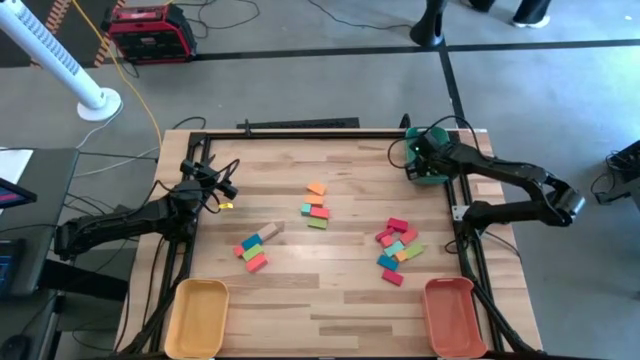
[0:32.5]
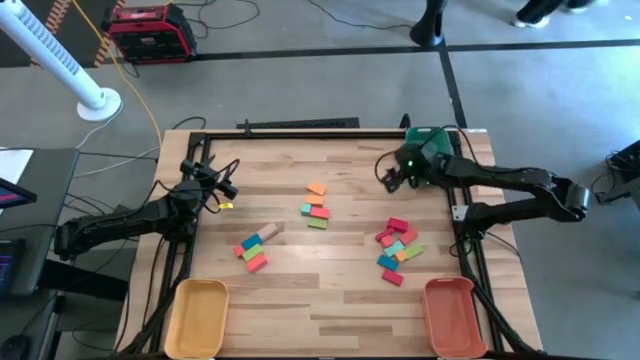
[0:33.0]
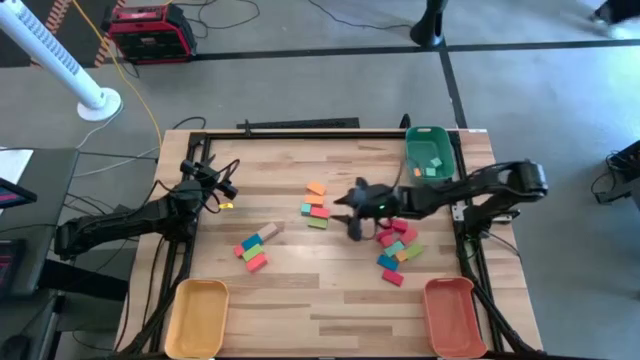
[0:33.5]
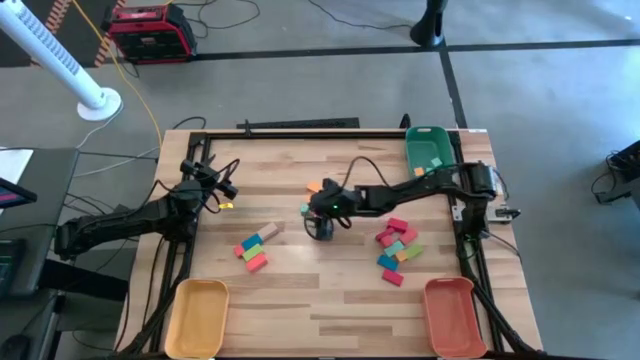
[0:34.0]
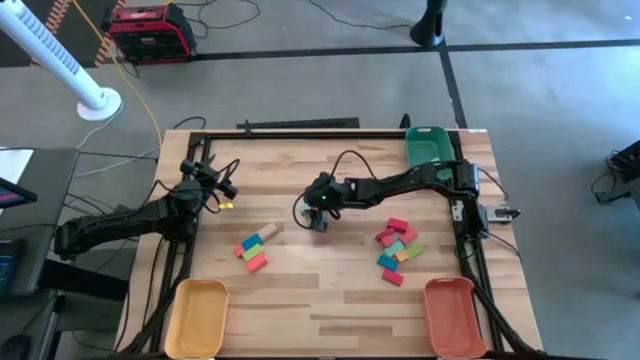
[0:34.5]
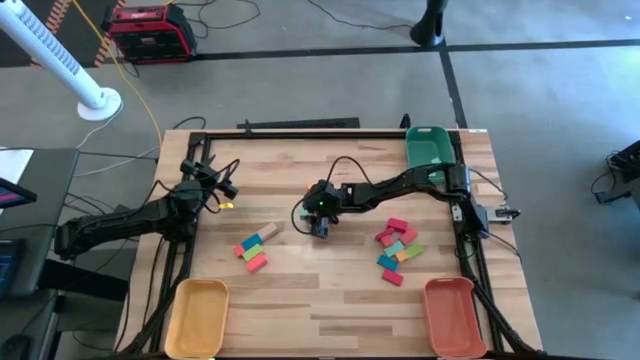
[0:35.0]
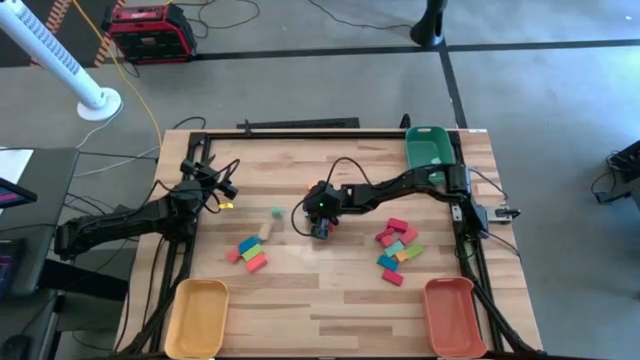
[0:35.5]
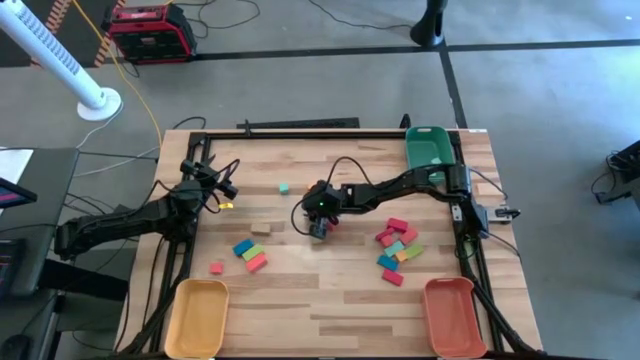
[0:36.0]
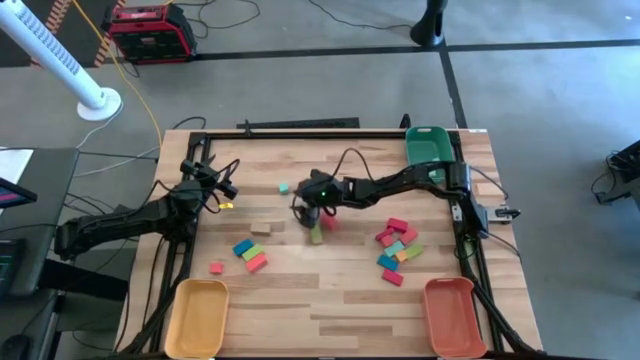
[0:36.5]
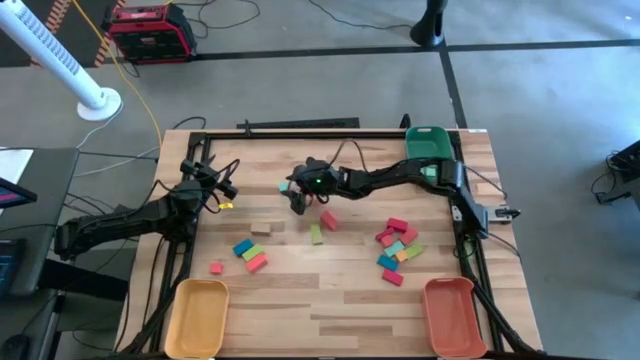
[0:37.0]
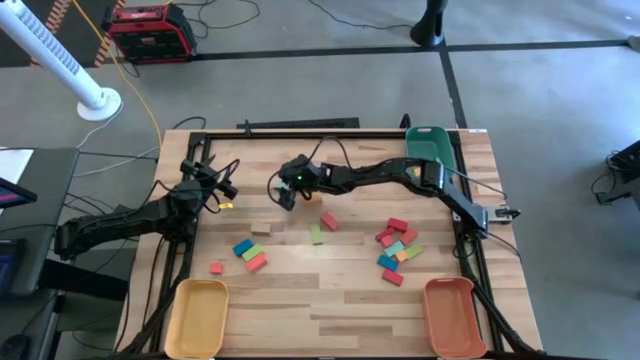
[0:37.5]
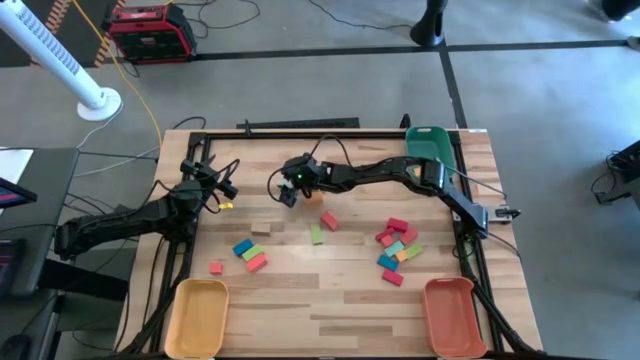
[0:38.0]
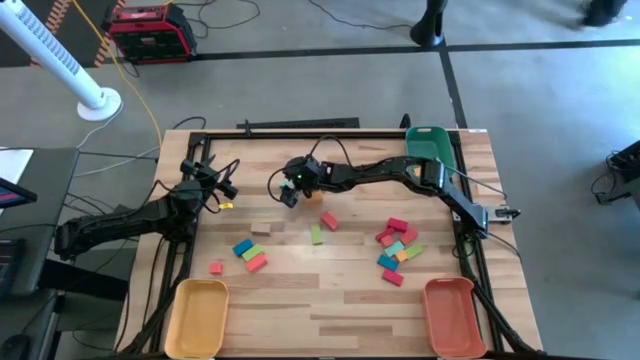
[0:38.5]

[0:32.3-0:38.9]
Task: Sort blocks by size
Put the blue square block into the green bin

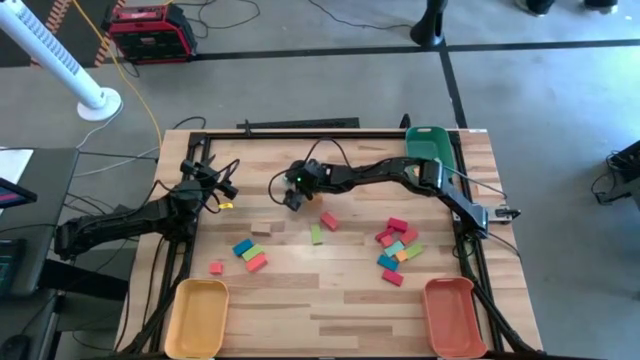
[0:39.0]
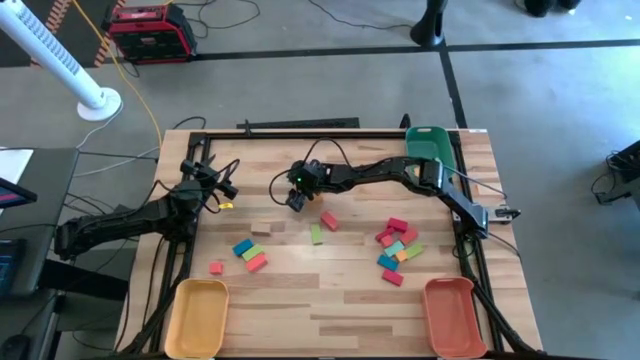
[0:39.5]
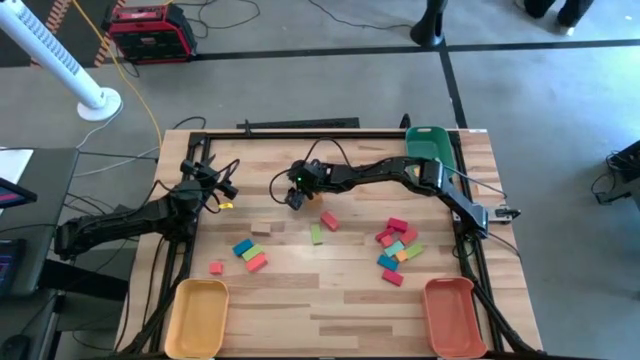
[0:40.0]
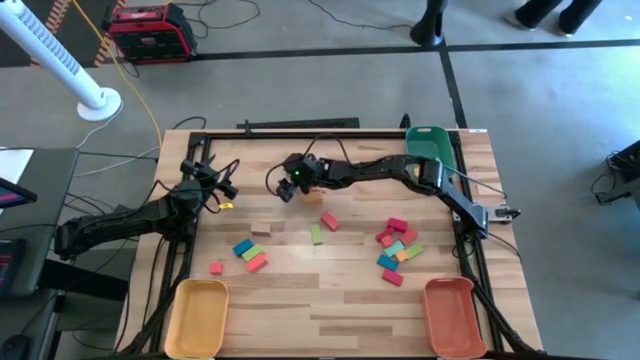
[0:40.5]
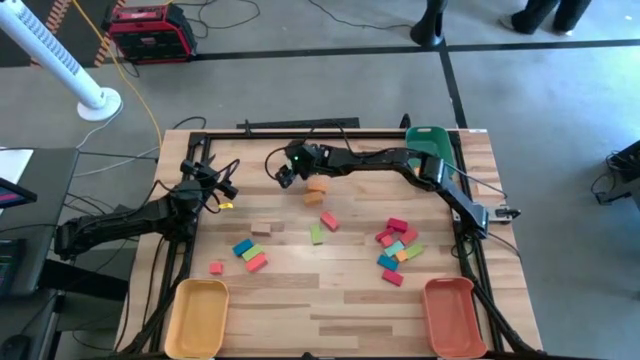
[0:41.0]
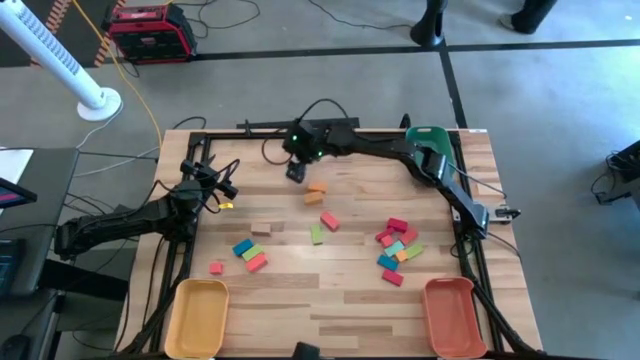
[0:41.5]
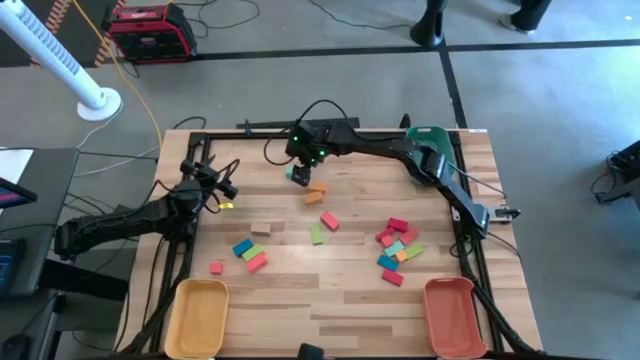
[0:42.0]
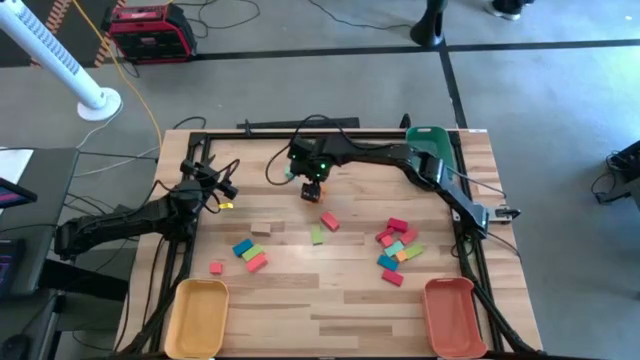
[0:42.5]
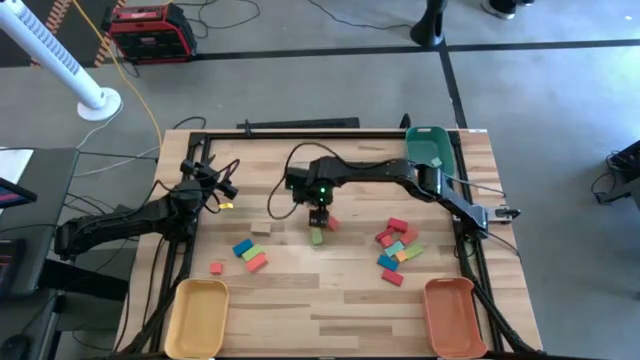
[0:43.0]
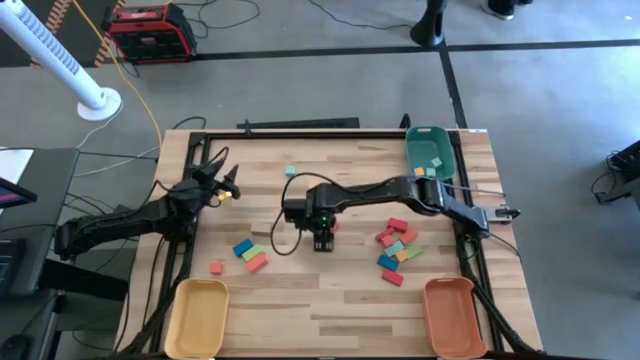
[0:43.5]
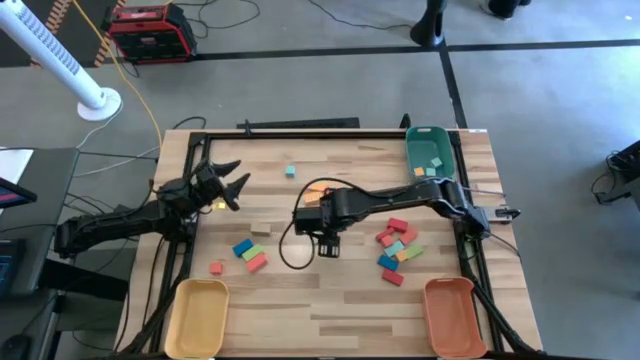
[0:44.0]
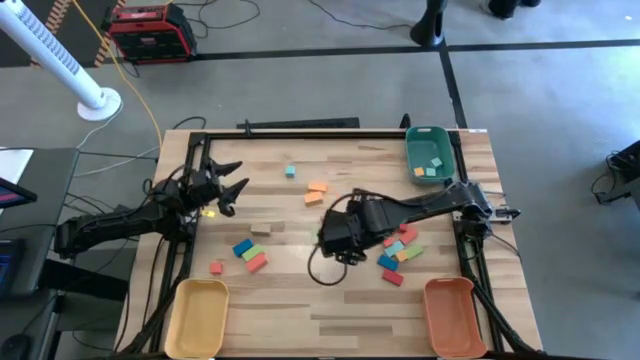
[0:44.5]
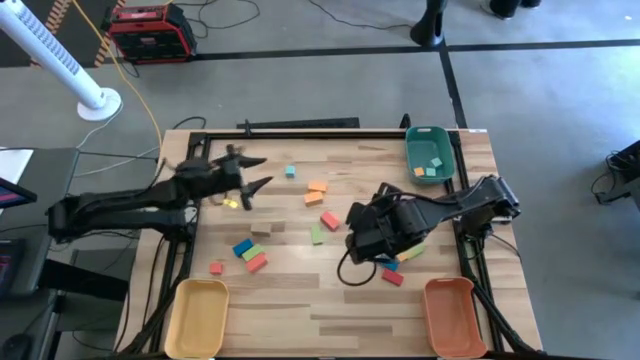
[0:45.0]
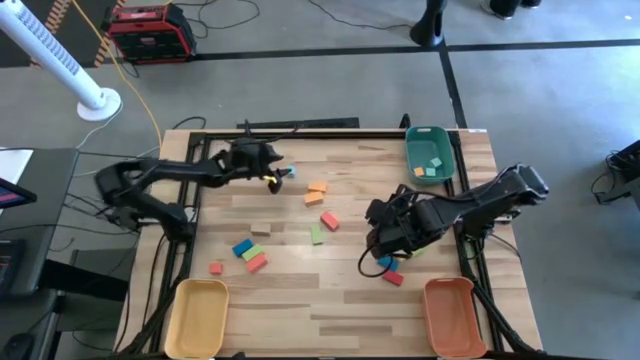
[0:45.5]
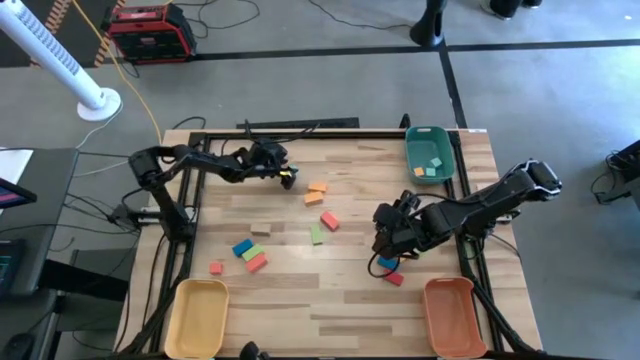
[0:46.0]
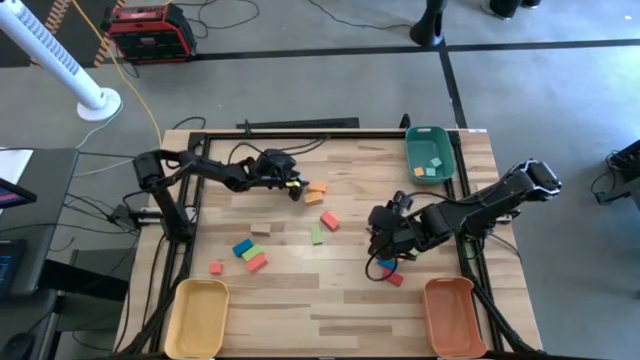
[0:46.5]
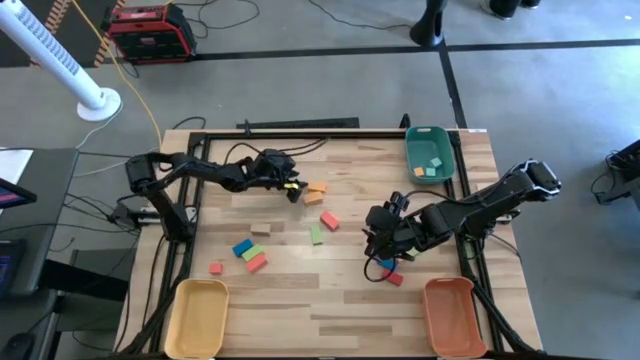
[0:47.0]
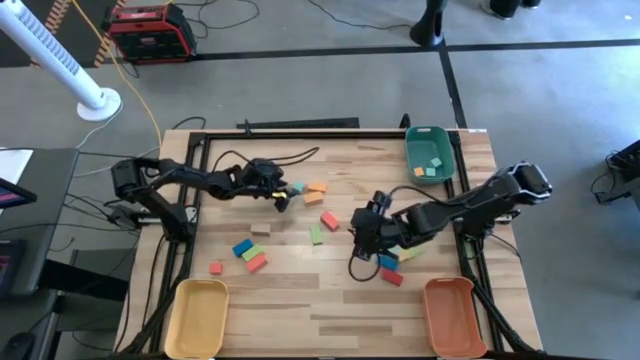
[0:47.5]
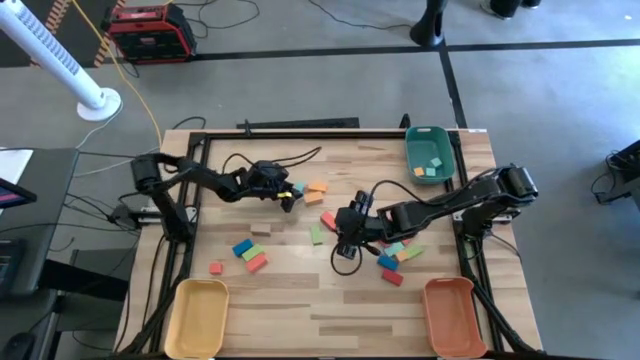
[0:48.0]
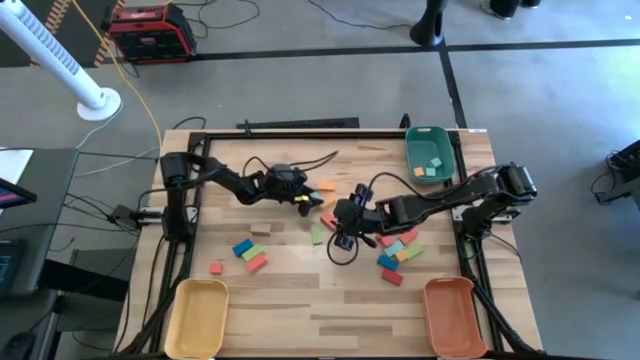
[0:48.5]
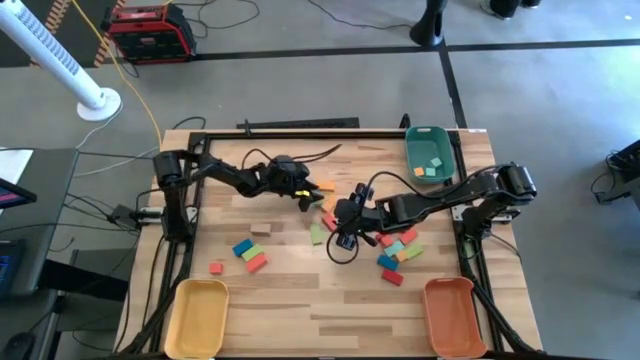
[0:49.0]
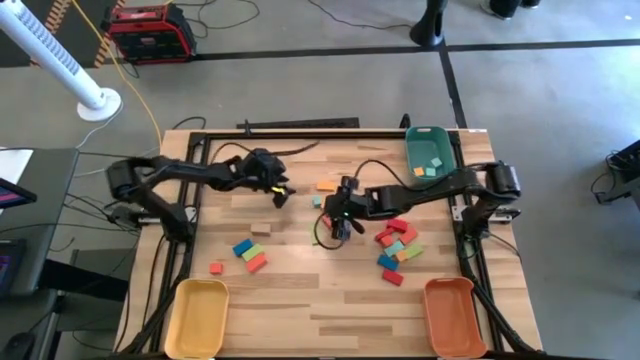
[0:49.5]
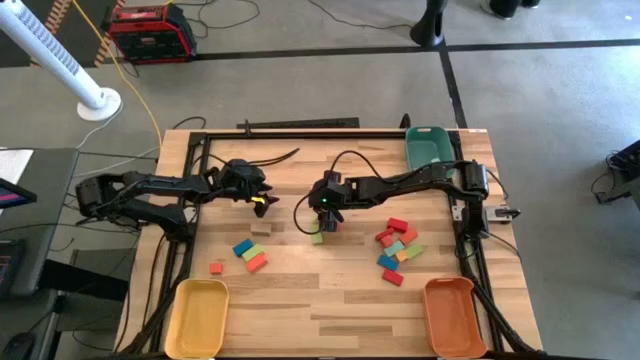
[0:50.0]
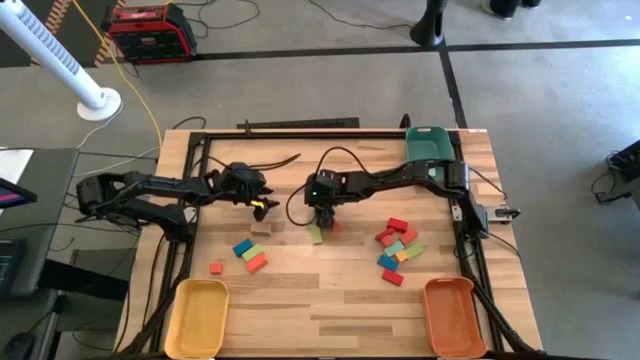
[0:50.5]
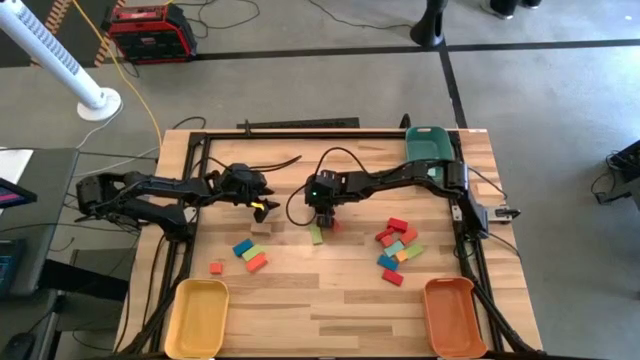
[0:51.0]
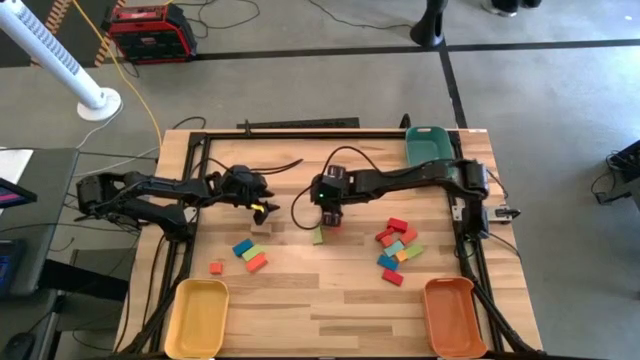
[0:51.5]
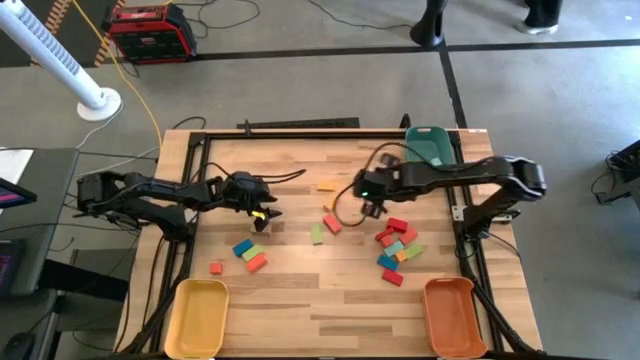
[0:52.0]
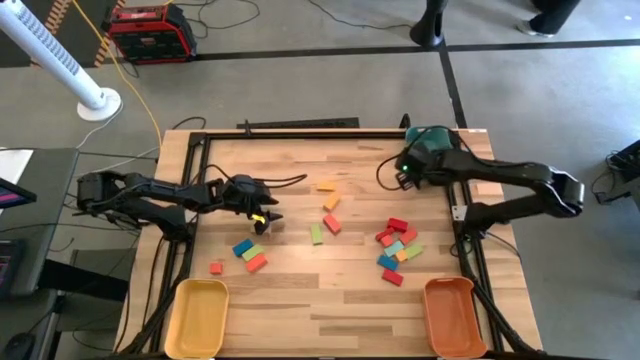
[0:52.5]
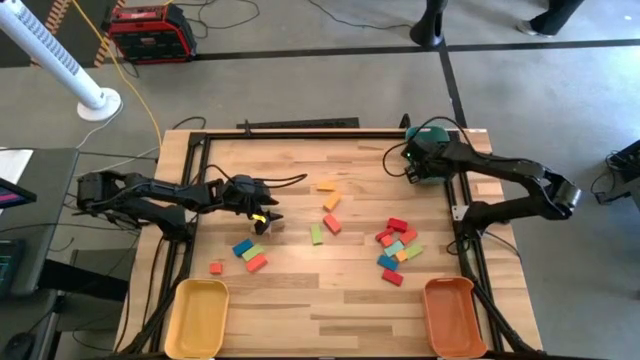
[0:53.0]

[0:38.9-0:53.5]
Put the blue square block into the green bin
